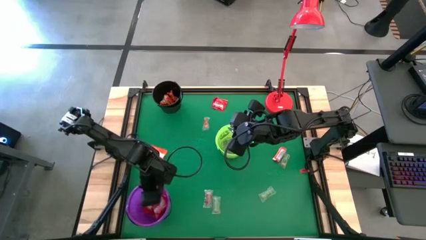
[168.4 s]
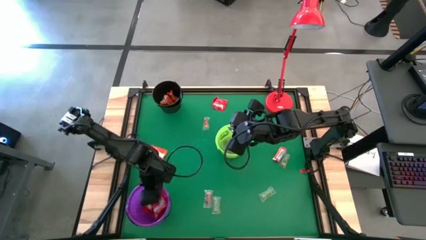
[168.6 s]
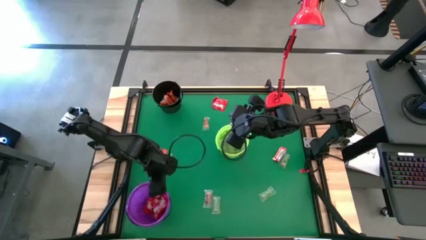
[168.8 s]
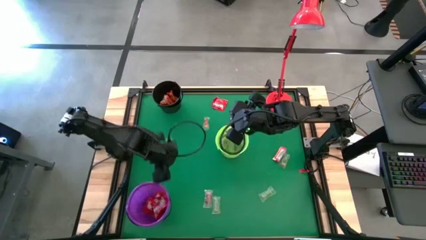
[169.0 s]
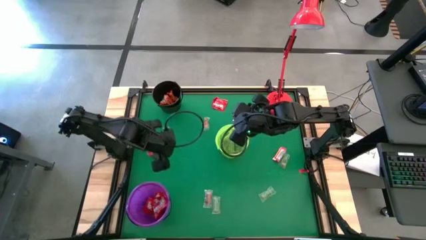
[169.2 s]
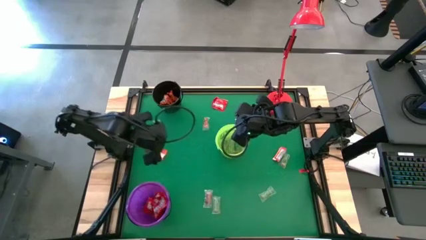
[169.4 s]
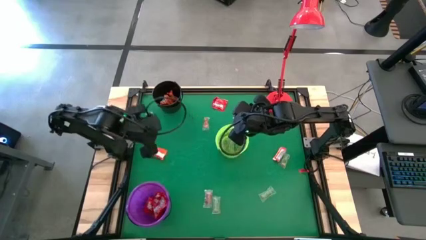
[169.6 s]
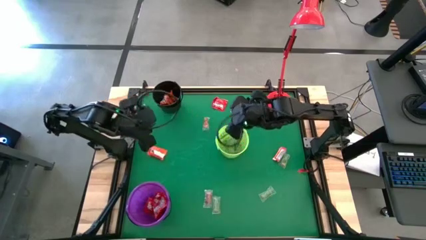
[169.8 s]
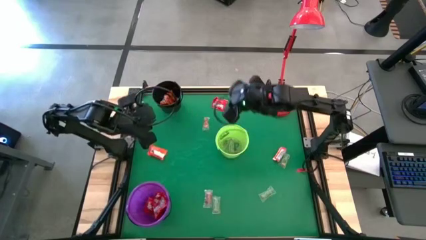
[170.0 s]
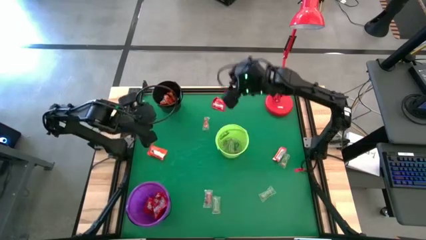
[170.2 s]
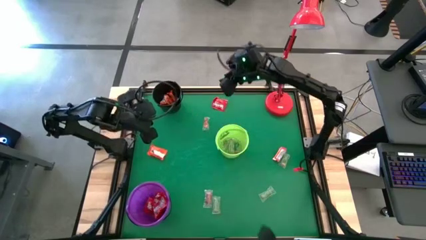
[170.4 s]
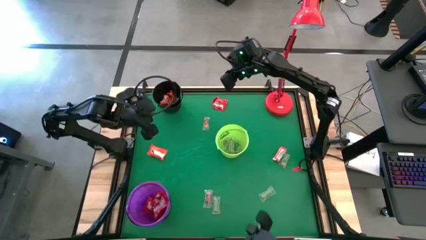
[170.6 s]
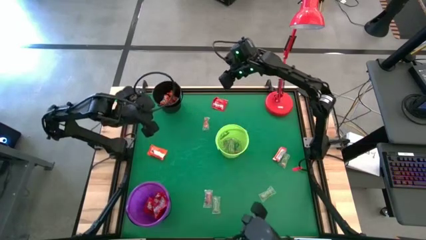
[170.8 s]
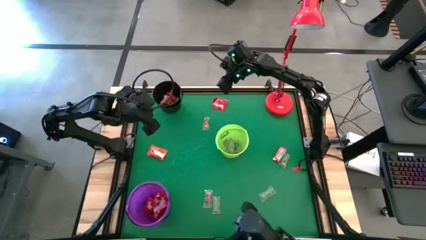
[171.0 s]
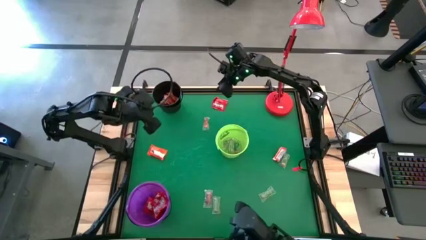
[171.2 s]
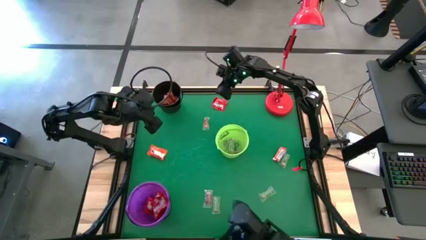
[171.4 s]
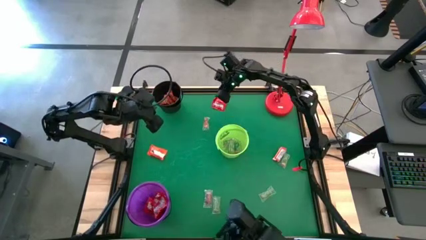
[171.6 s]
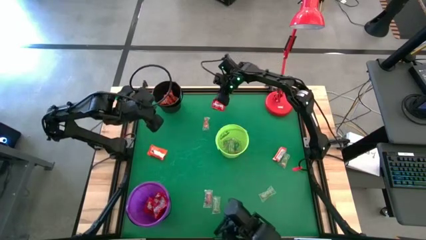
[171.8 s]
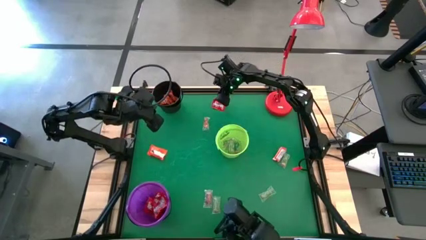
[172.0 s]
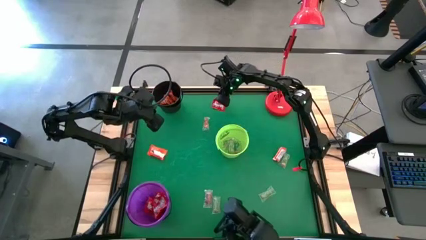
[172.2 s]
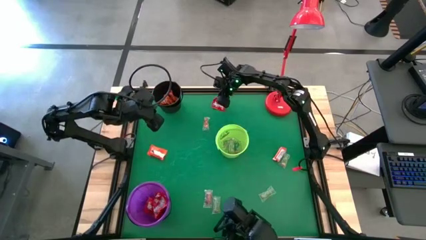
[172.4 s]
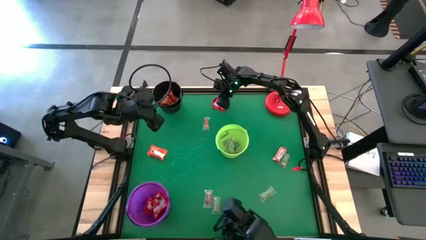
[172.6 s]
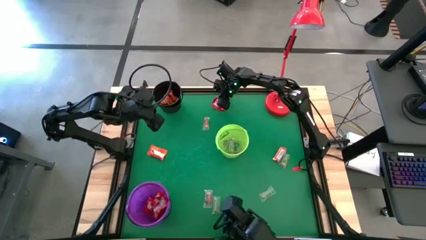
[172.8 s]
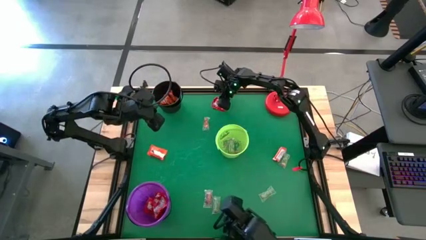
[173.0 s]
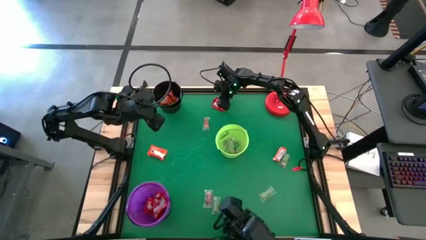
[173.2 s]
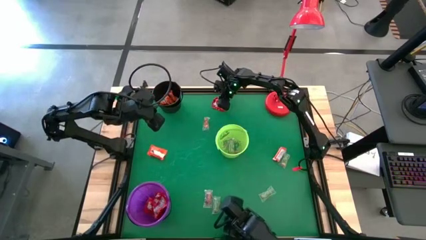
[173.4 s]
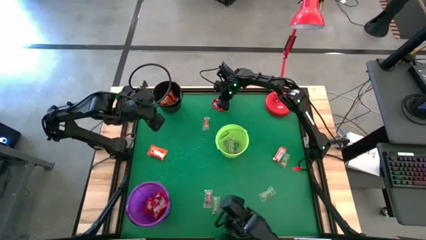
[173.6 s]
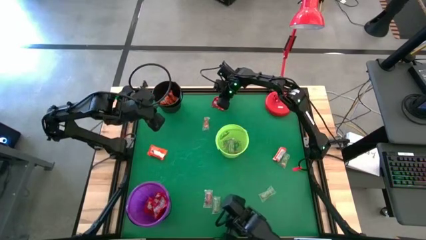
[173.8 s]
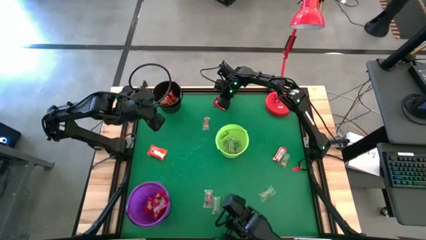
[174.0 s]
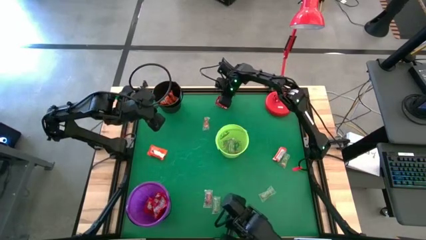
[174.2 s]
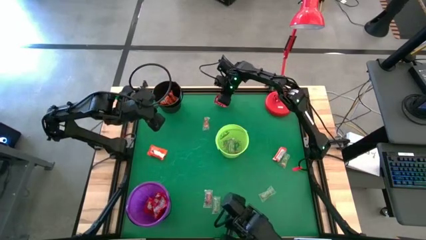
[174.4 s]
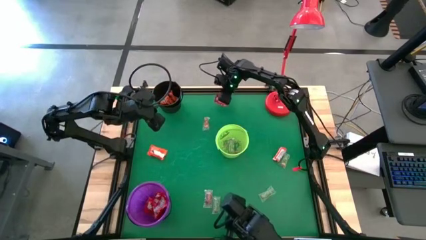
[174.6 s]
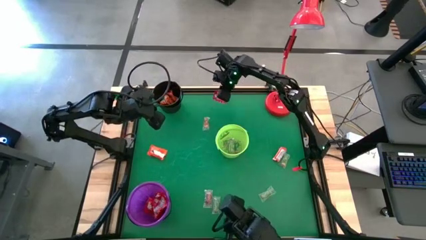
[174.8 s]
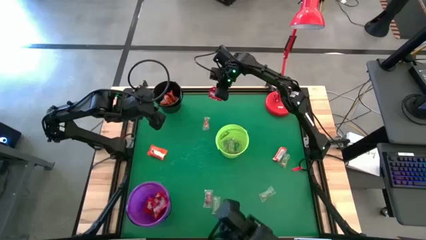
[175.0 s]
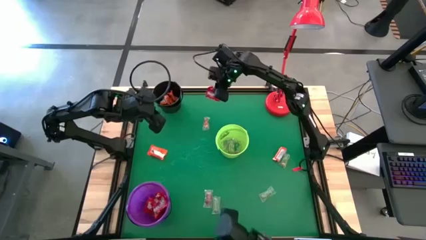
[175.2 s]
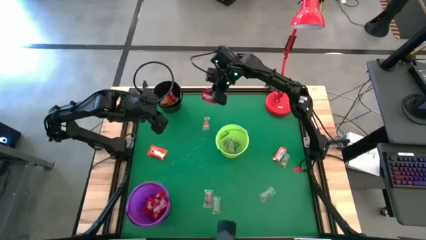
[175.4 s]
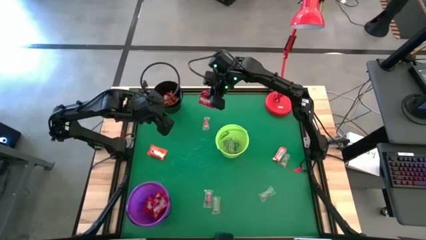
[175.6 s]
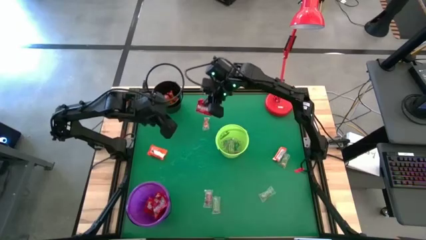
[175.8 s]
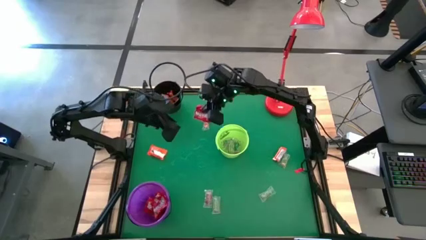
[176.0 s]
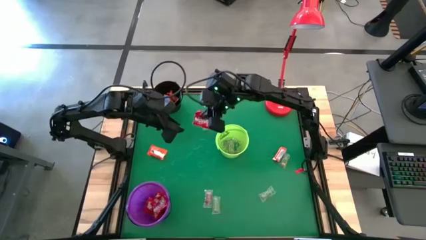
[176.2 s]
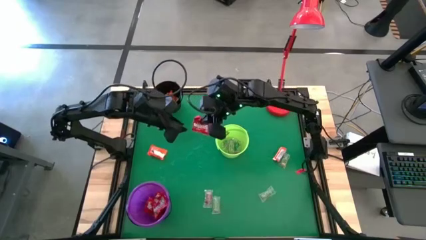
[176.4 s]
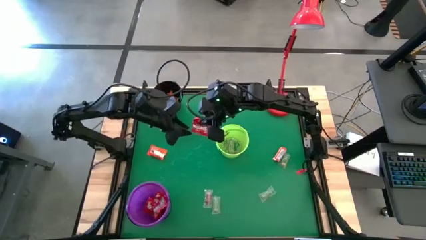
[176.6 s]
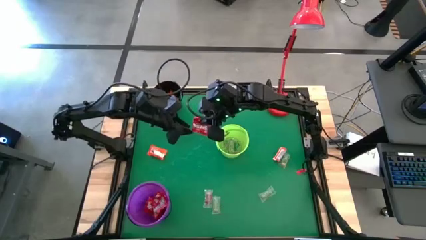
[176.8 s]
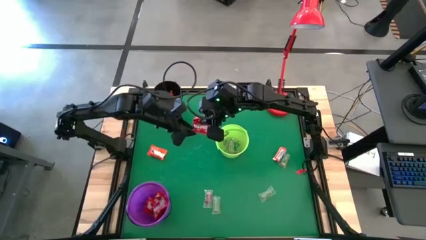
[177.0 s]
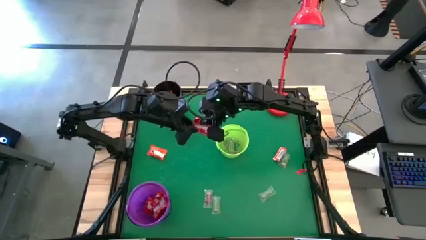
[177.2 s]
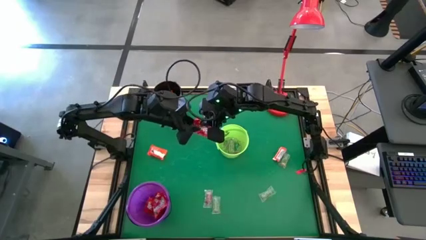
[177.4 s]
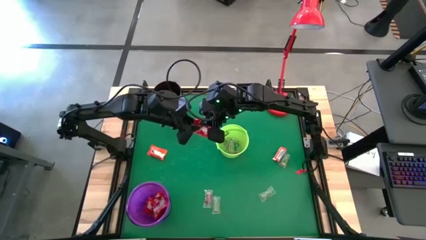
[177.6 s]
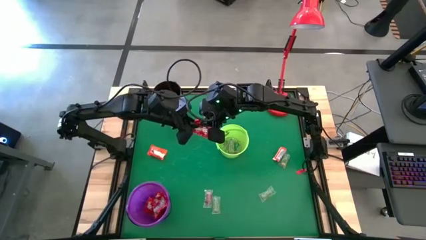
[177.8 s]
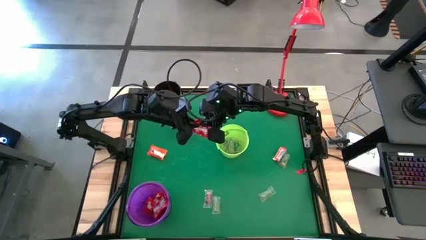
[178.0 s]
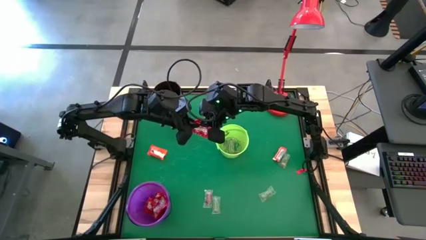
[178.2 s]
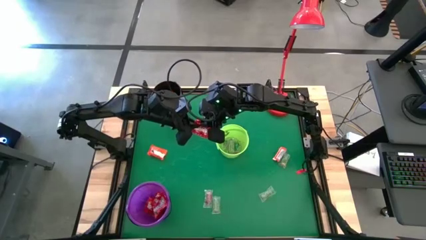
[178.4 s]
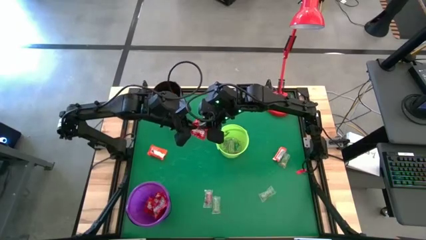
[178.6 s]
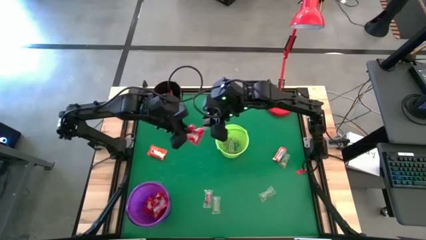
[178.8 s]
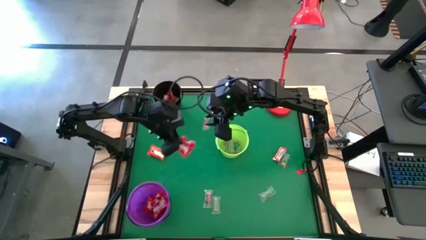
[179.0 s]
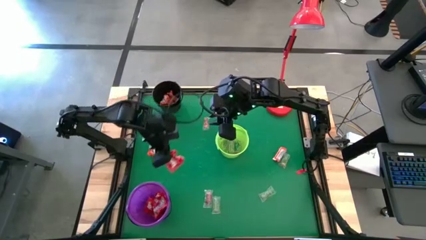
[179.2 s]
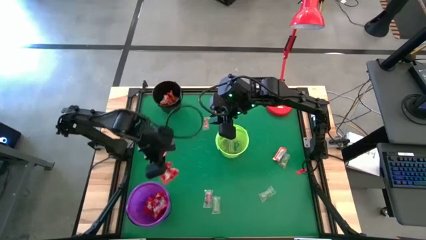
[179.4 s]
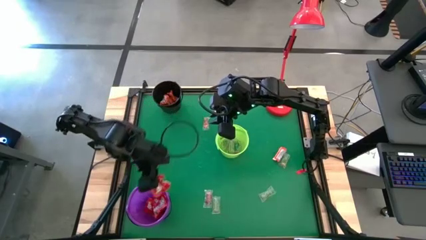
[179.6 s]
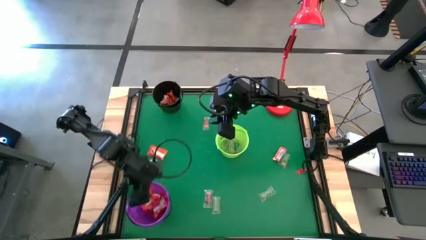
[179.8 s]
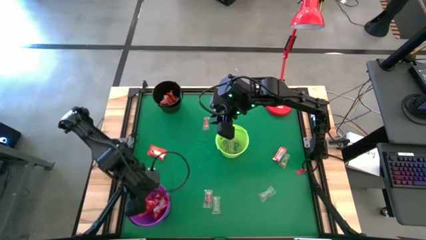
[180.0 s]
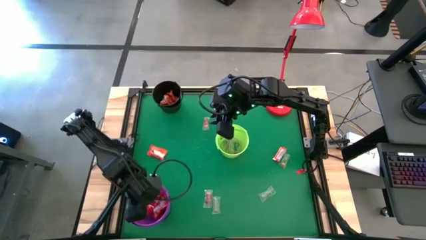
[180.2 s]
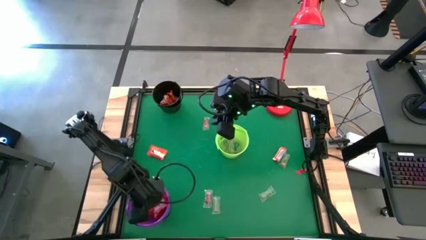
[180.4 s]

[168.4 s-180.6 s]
Task: Sort candy
Put the red candy into the violet bucket

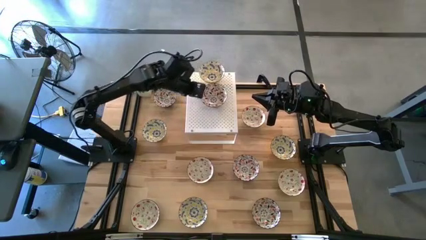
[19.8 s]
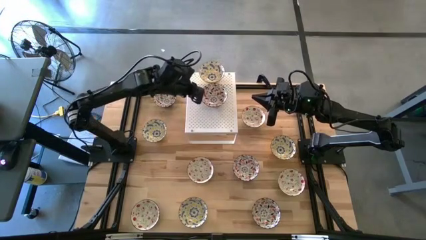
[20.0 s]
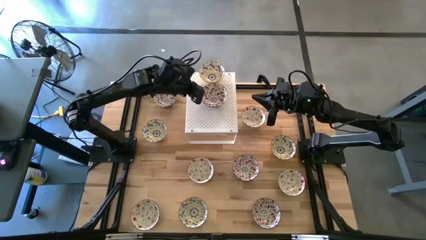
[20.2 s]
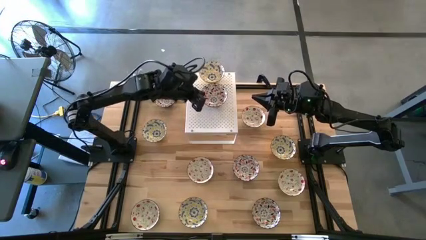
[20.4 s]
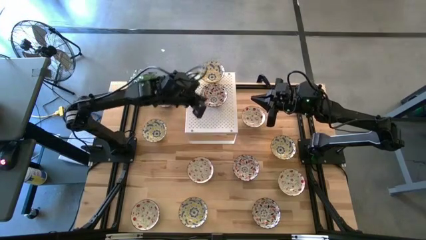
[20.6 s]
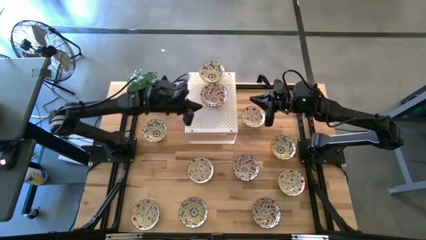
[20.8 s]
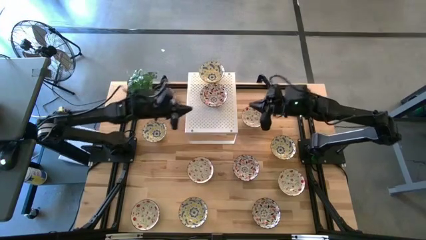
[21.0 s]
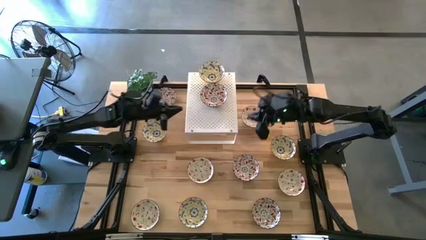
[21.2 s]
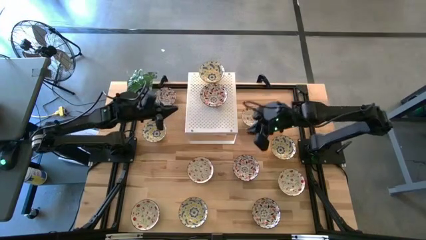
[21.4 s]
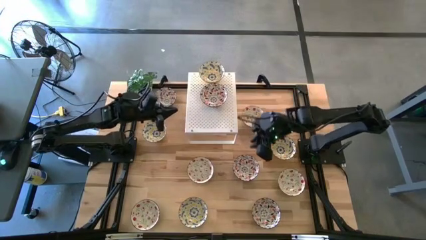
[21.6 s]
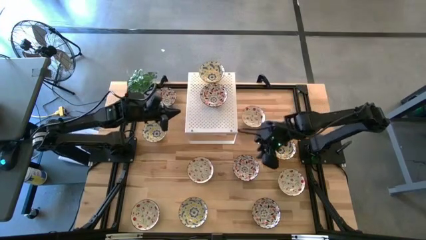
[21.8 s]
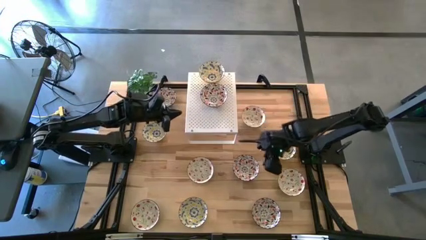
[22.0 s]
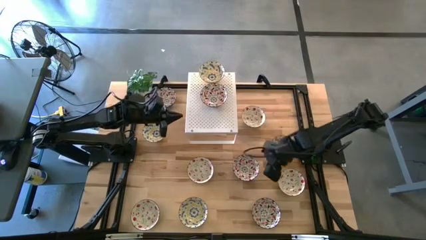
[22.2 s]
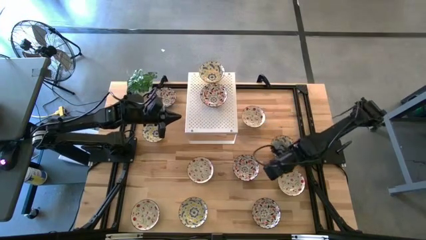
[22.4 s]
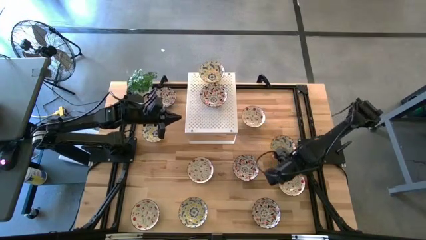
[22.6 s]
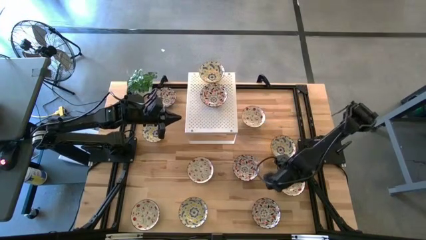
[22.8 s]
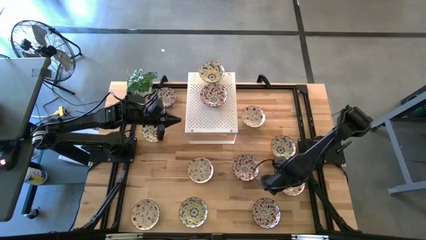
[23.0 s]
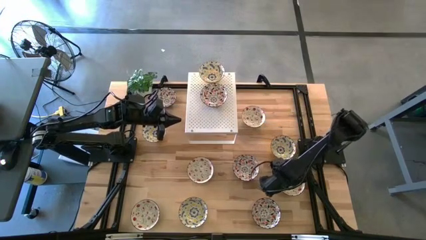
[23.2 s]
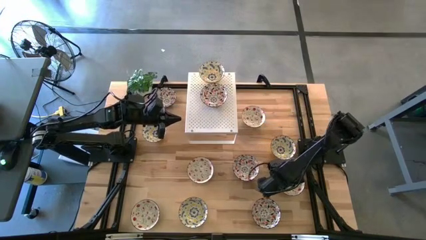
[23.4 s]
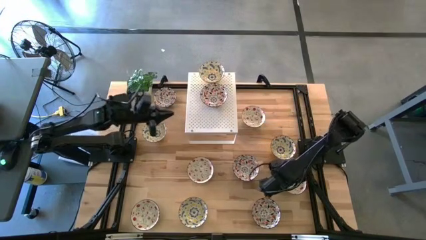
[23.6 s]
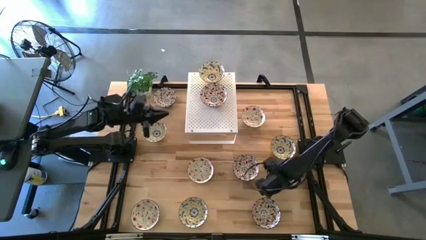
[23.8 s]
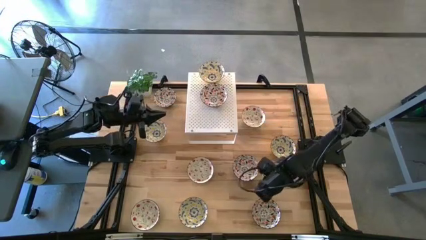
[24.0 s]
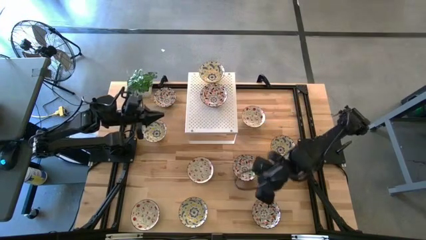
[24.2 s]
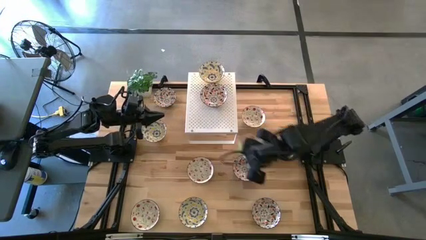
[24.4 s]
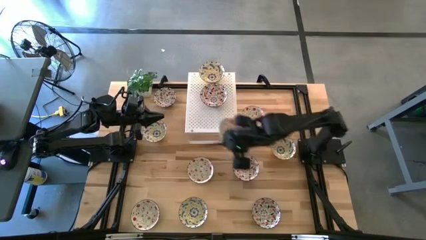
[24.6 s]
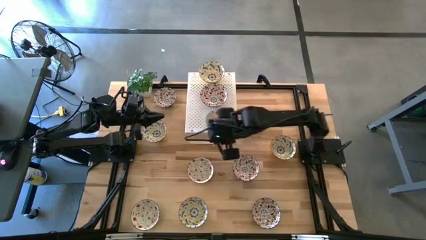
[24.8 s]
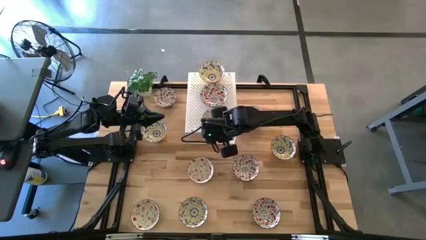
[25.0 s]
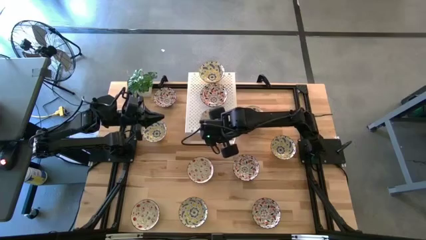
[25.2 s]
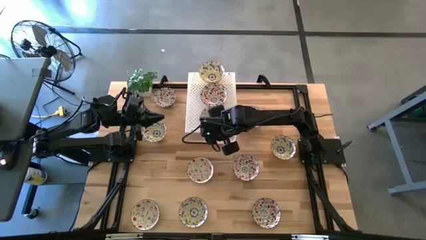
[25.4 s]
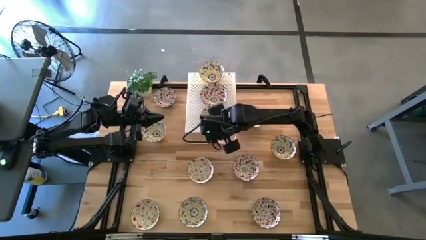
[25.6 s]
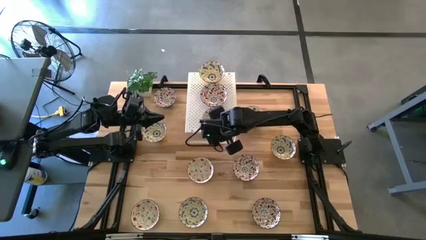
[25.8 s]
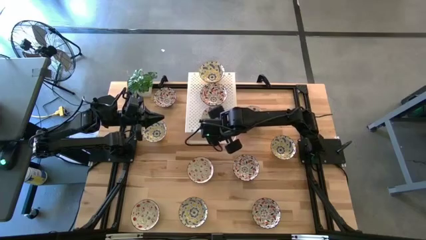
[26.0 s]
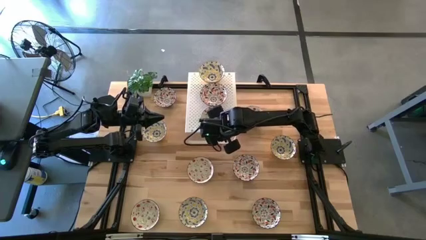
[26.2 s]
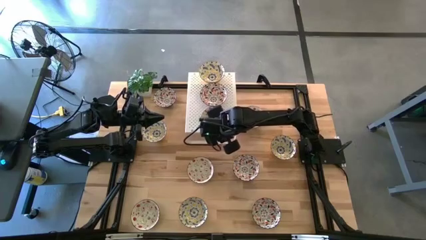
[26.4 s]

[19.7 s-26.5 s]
Task: Pick & Place Mini bowls
Put the red patterned bowl on the shelf
